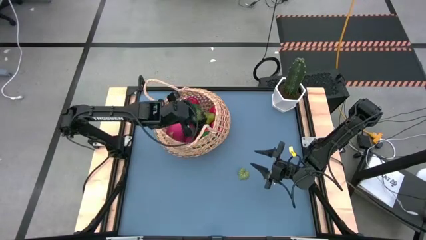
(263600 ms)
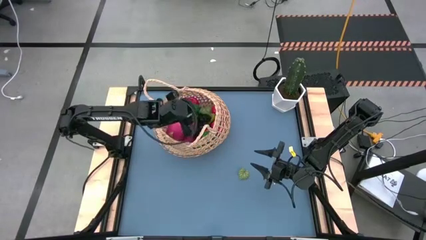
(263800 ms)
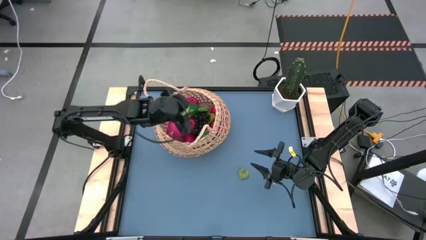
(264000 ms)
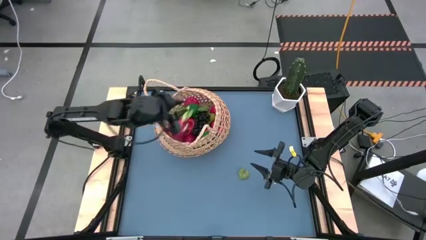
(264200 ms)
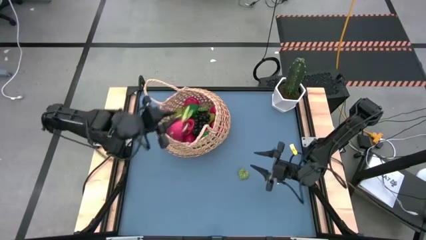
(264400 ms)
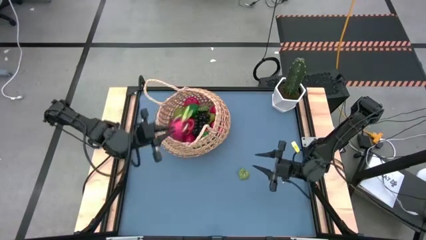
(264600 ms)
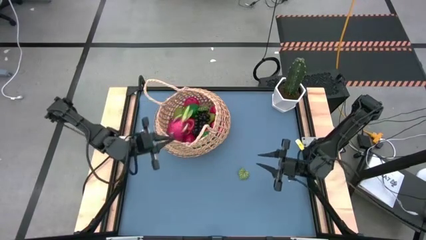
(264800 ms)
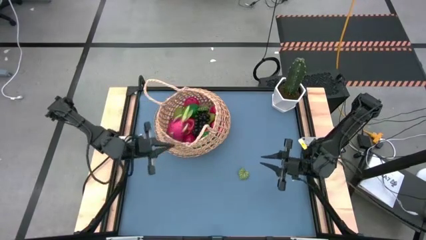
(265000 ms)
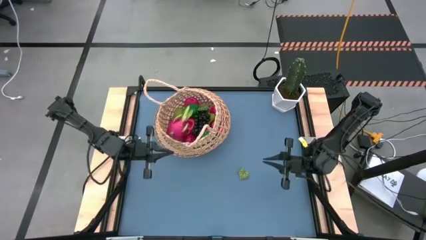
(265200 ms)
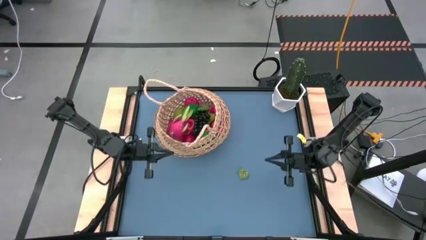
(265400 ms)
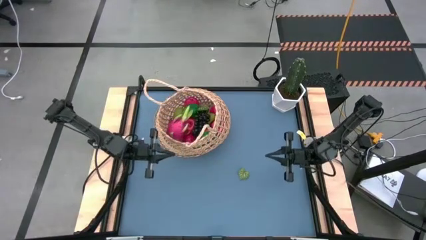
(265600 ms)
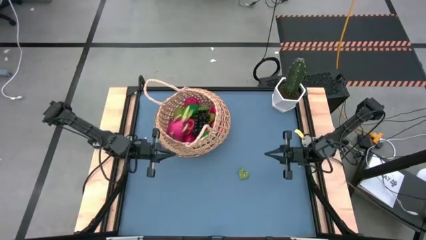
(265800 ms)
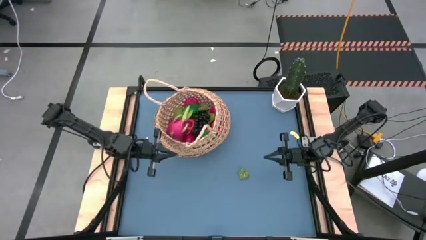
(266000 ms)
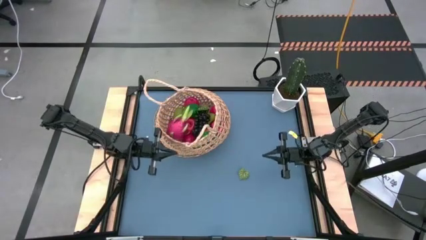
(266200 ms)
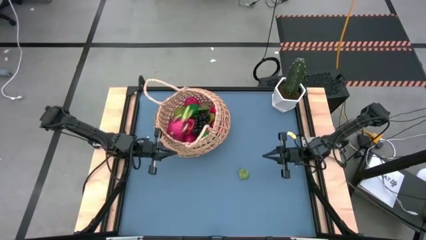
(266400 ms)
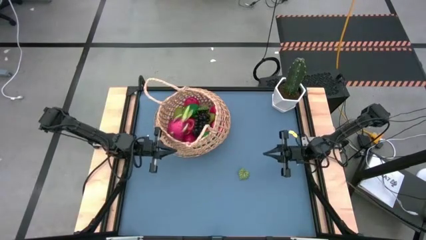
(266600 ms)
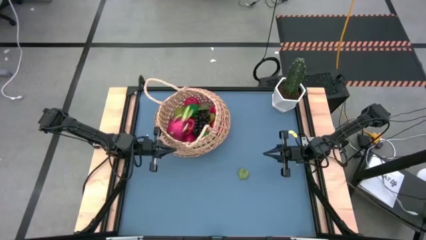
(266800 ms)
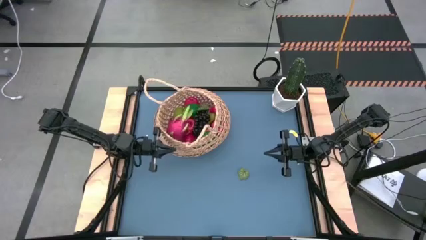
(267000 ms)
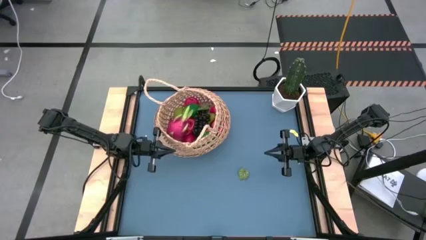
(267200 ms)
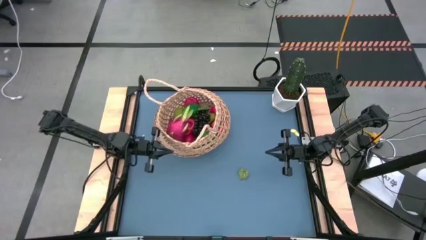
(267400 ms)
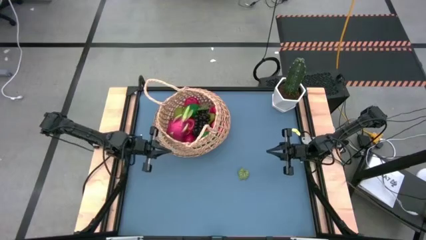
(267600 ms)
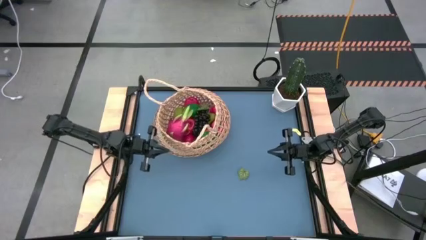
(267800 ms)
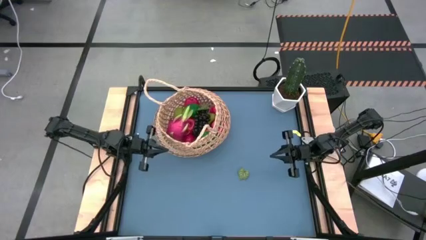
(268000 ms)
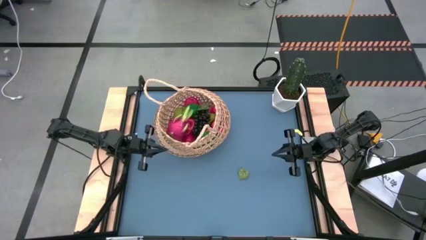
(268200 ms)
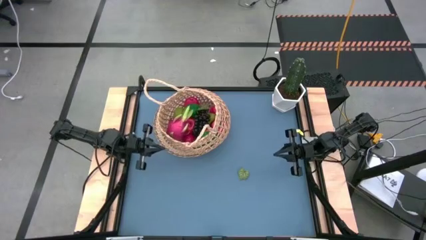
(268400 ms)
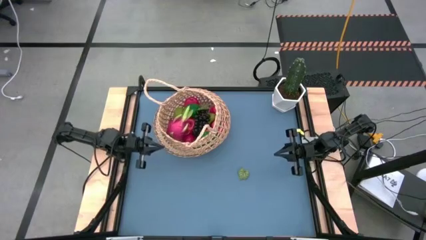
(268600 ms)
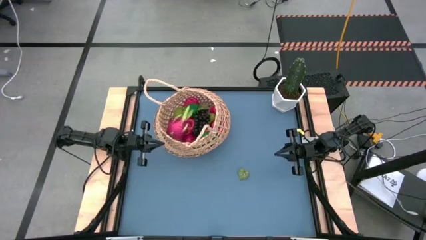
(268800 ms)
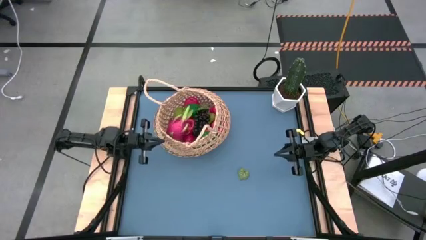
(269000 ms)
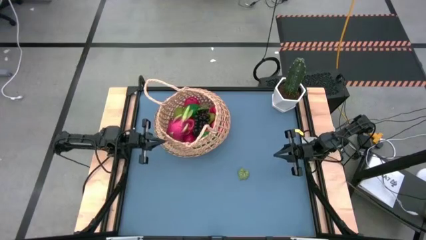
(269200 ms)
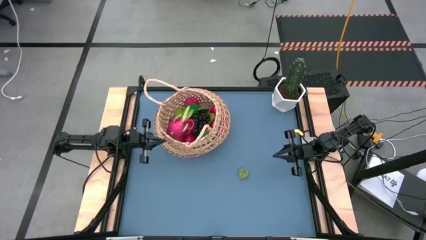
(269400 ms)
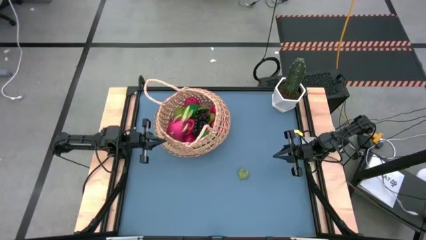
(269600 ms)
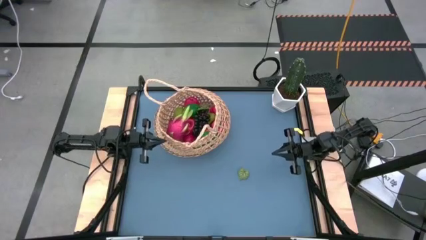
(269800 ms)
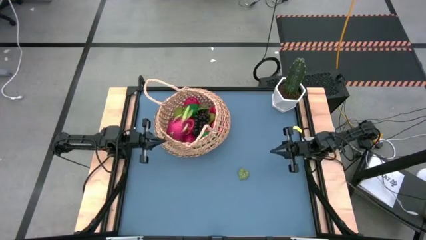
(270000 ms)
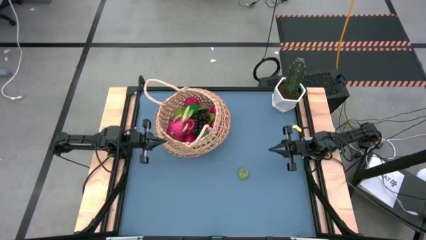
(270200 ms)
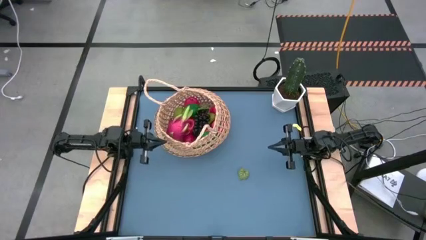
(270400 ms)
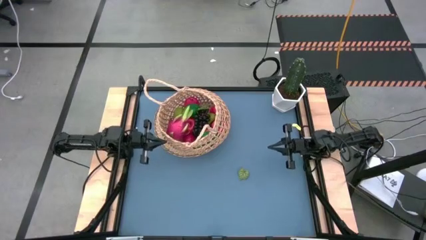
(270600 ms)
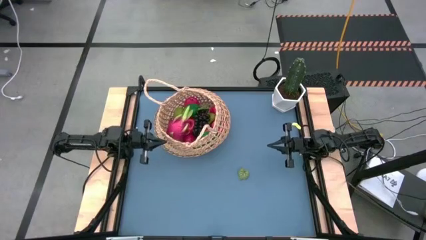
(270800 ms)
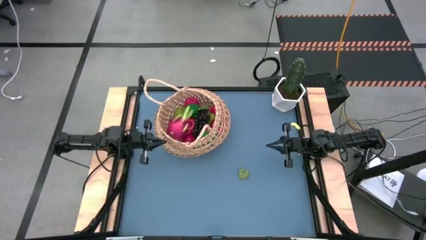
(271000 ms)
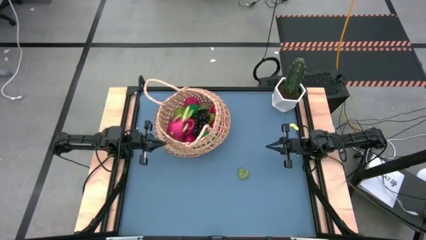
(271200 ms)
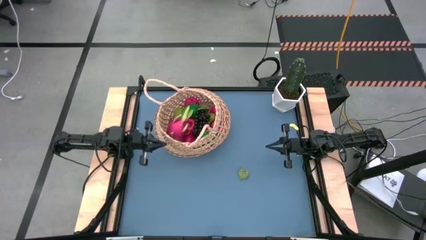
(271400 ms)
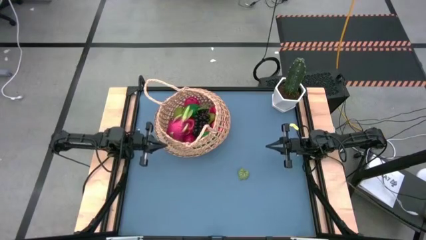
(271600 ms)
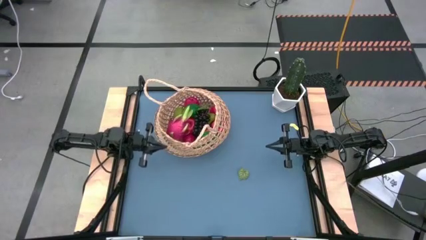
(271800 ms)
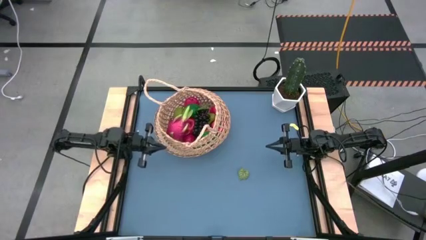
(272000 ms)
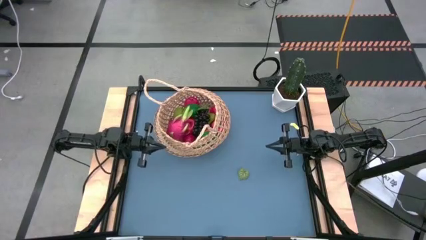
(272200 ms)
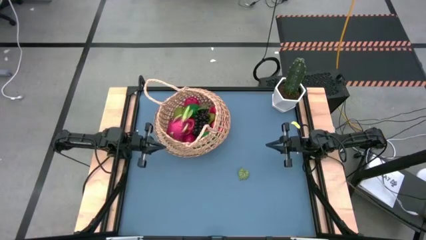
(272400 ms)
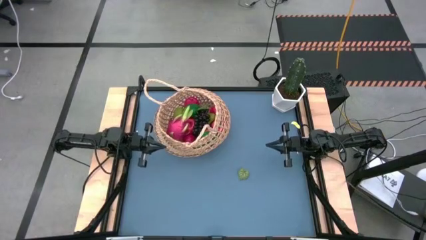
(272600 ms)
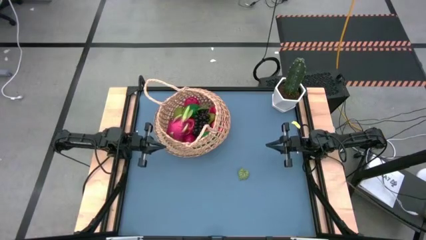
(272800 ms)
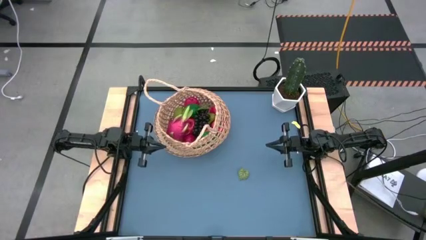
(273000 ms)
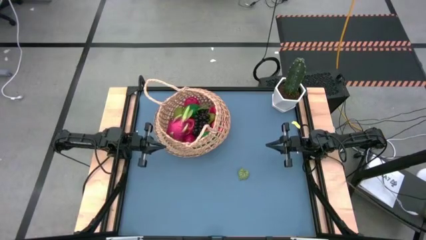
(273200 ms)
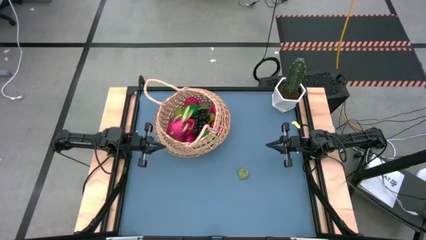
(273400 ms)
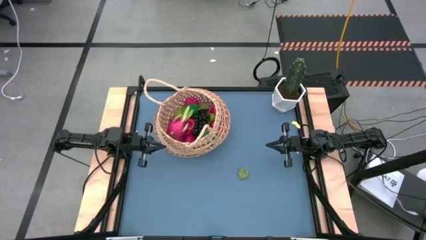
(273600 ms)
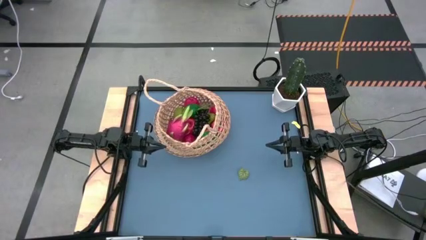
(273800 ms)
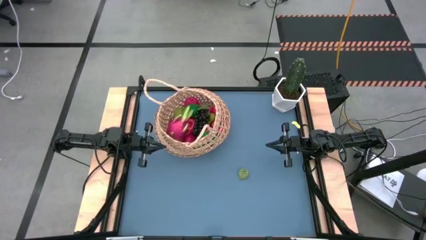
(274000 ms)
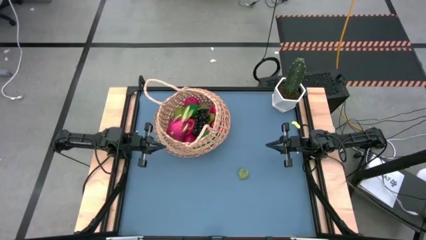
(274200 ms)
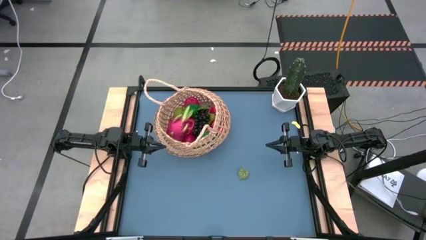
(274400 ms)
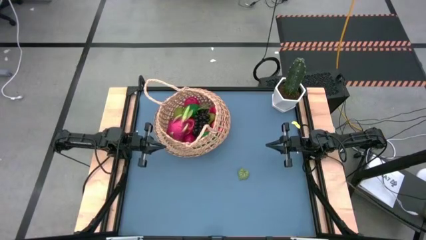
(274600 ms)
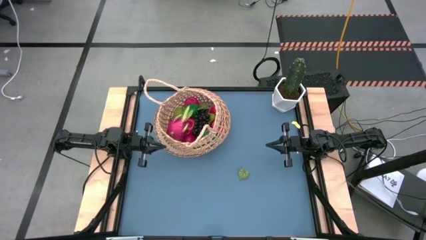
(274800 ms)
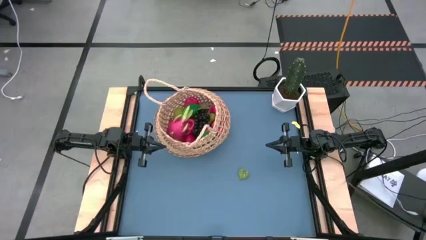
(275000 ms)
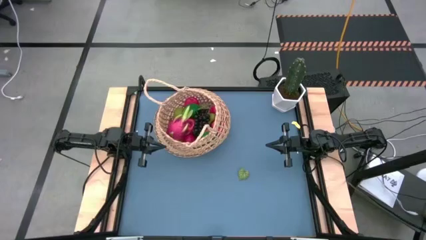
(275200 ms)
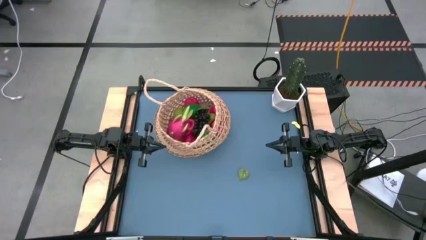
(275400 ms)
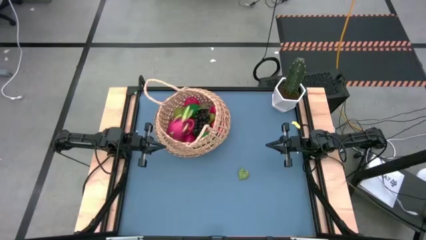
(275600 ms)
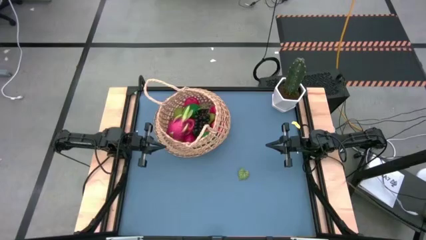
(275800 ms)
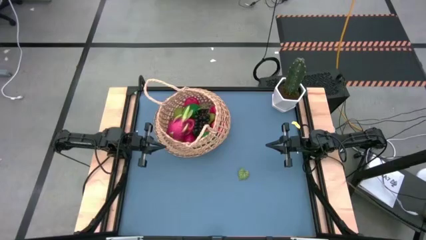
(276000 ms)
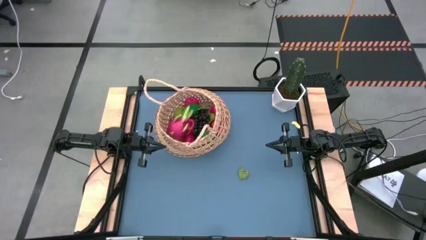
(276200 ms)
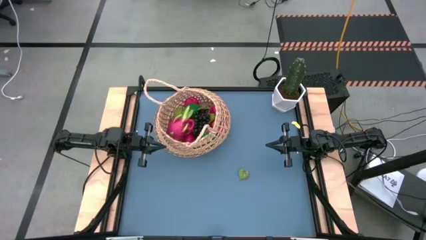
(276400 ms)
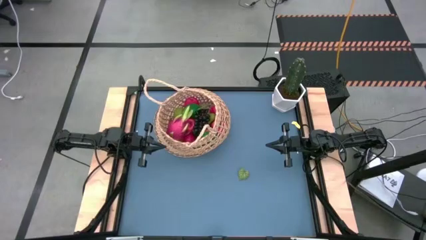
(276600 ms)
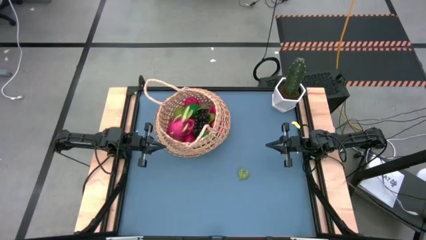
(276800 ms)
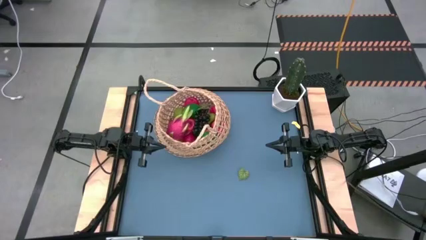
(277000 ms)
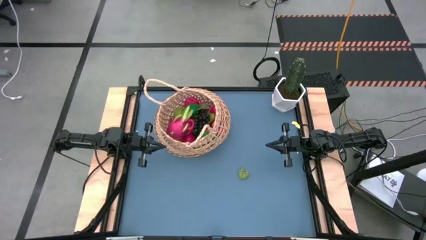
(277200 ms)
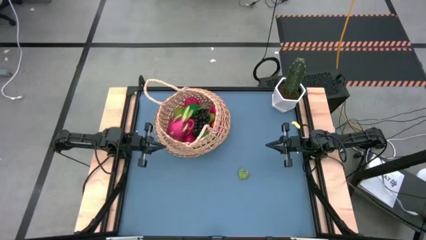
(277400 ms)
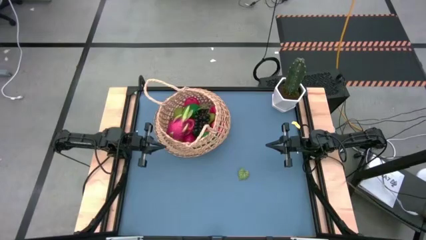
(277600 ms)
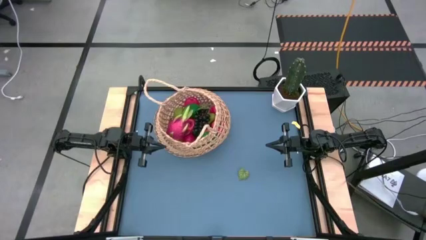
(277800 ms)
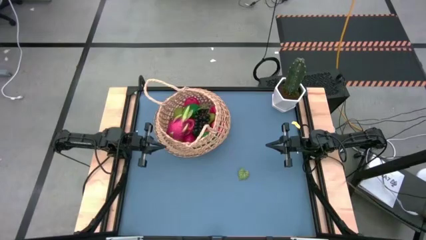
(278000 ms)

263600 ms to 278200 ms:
Task: Build produce basket
Return to Home Position
